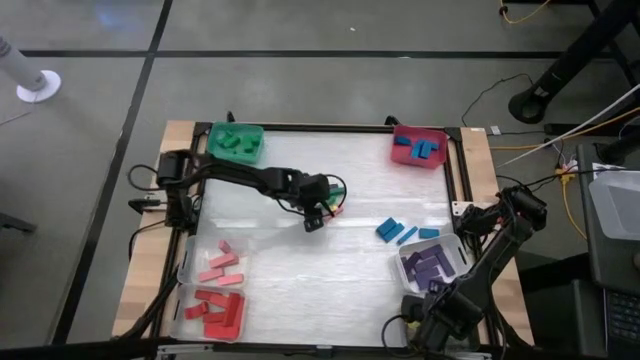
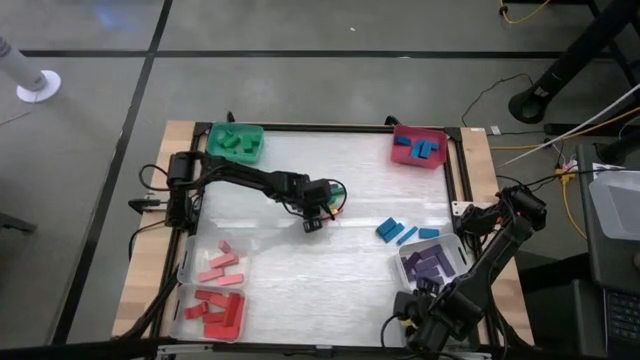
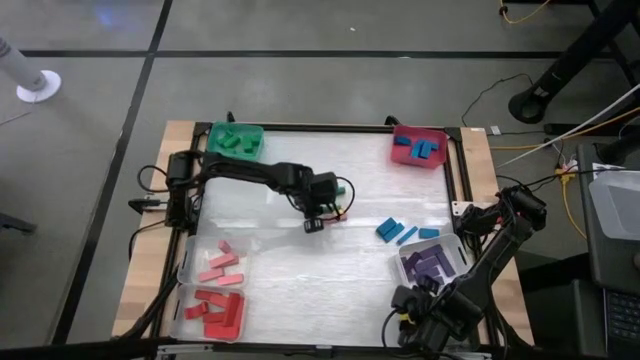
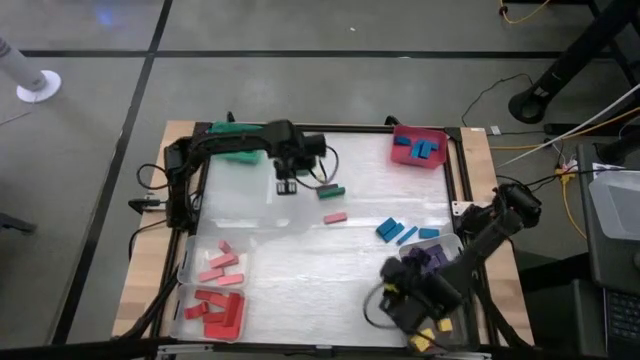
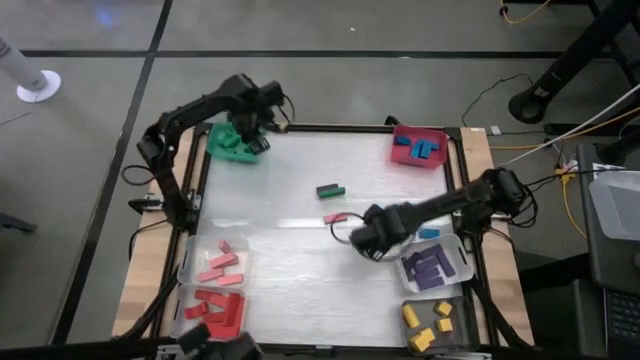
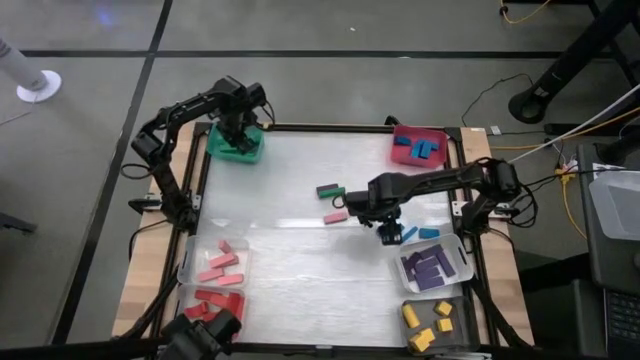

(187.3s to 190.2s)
Task: Sort blocks
Put the green block into the green bin

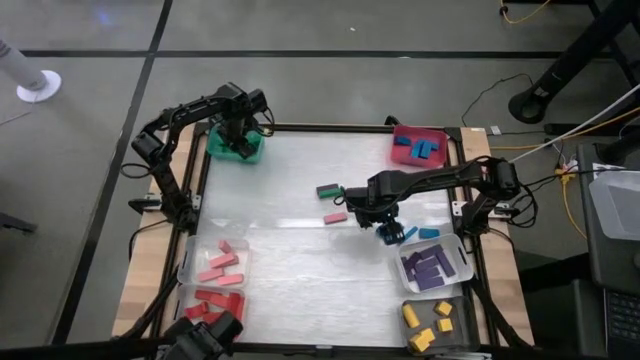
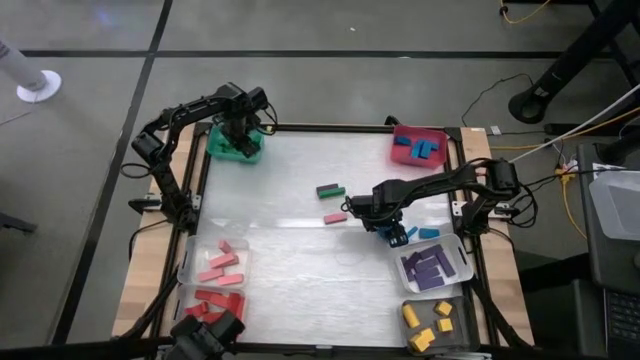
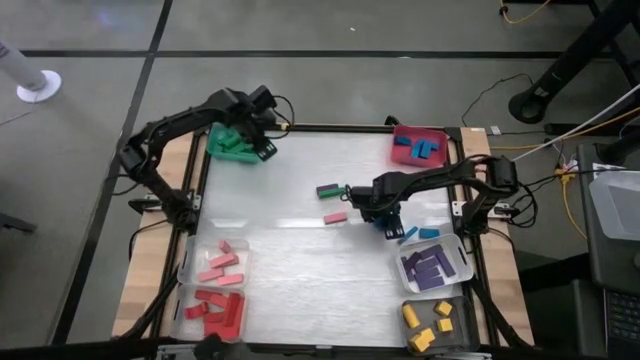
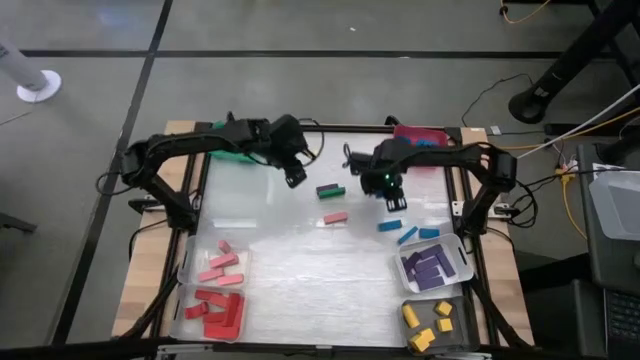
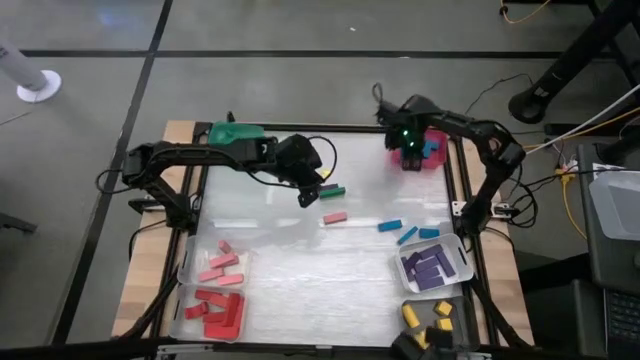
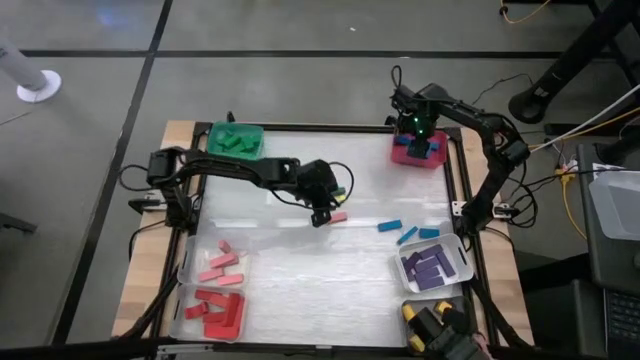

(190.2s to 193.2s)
Put the blue block into the pink bin

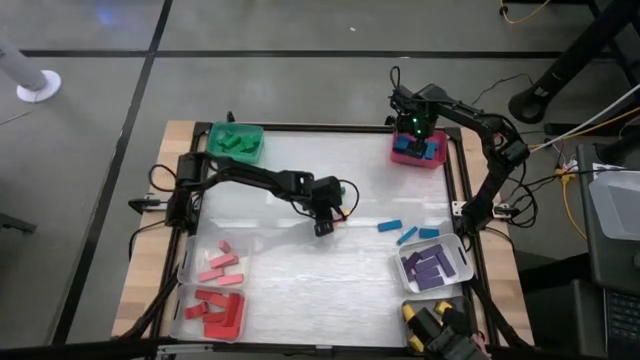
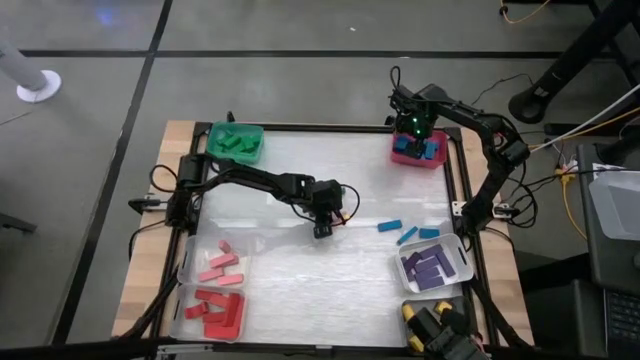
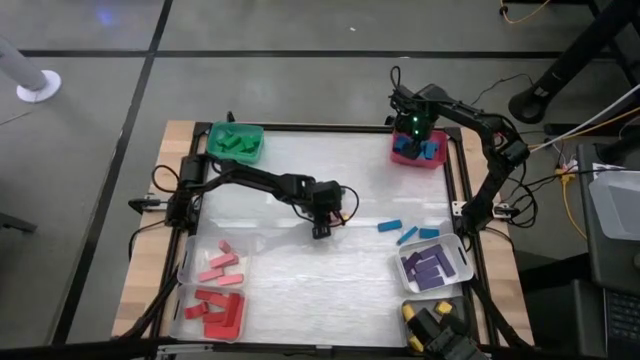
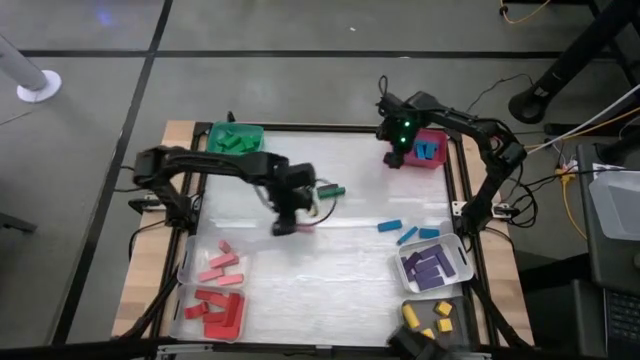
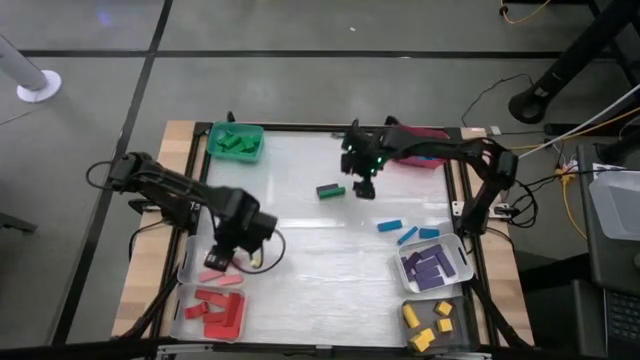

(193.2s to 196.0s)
Put the pink block into the top transparent bin

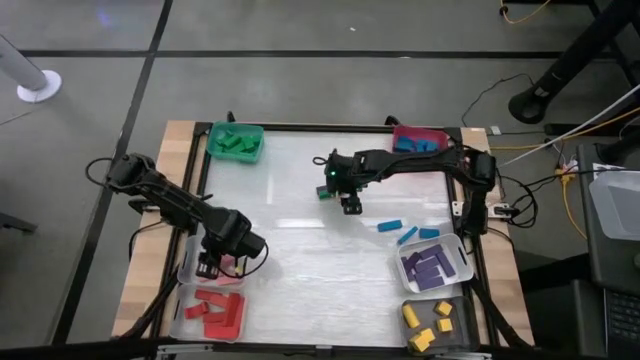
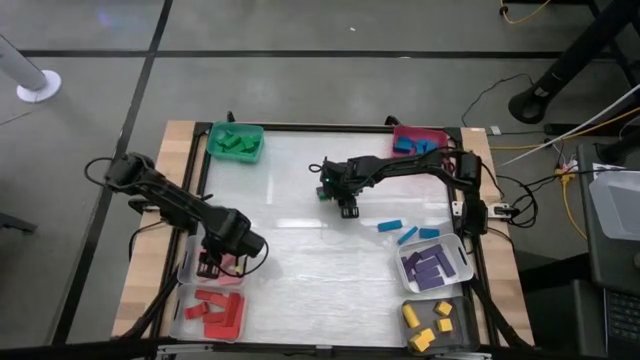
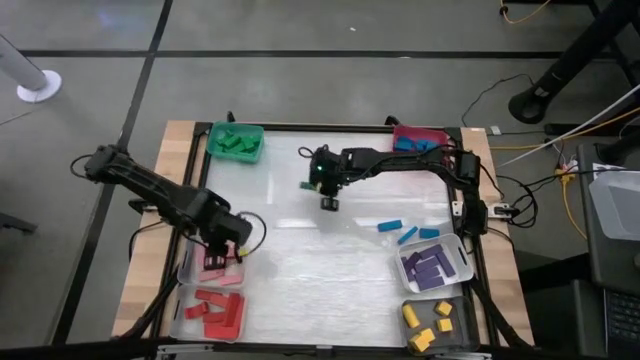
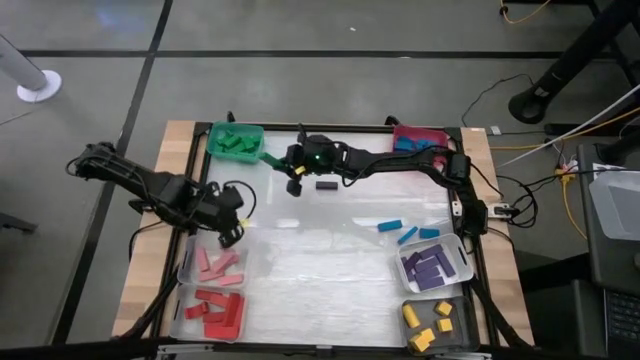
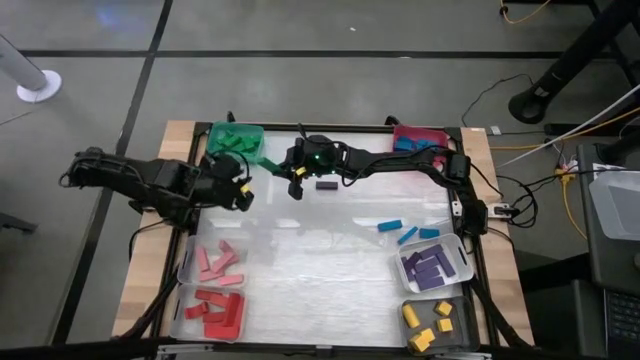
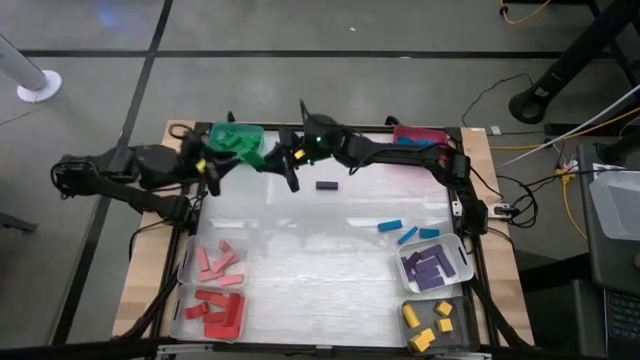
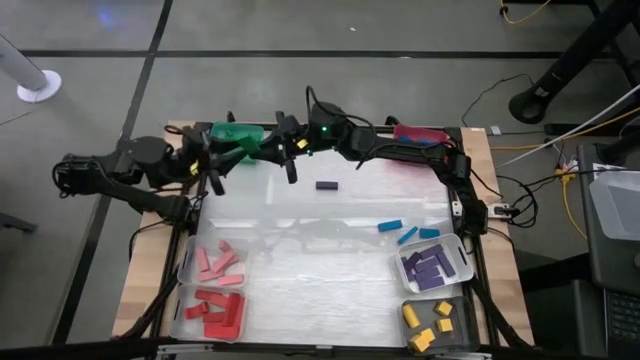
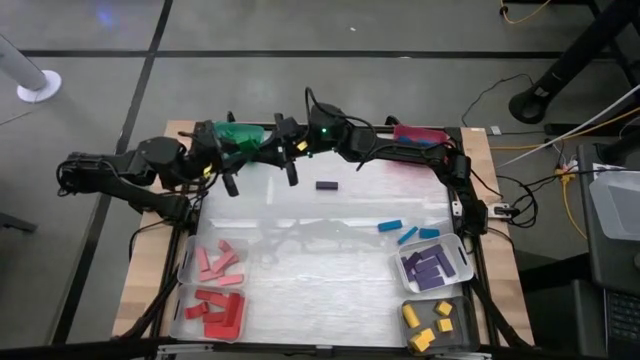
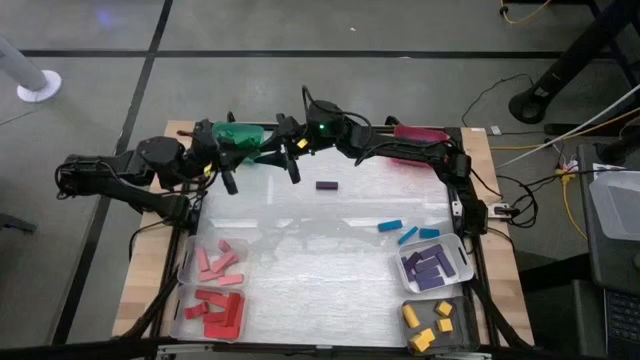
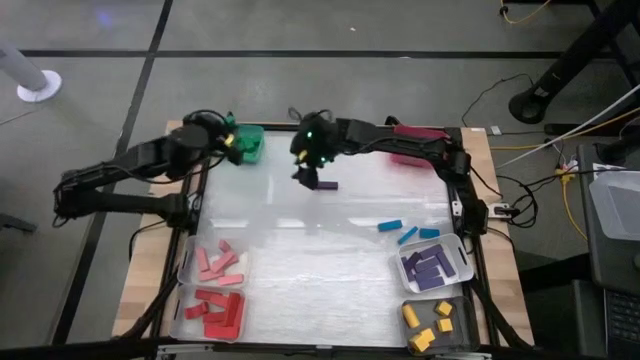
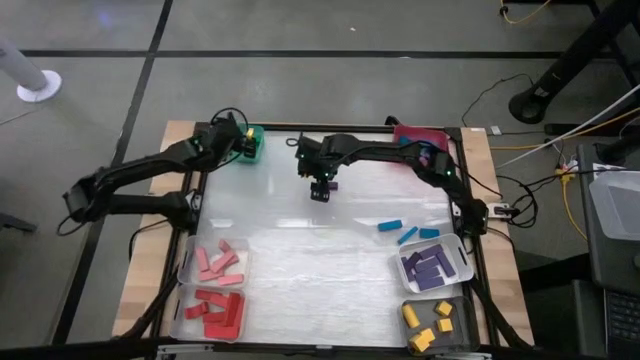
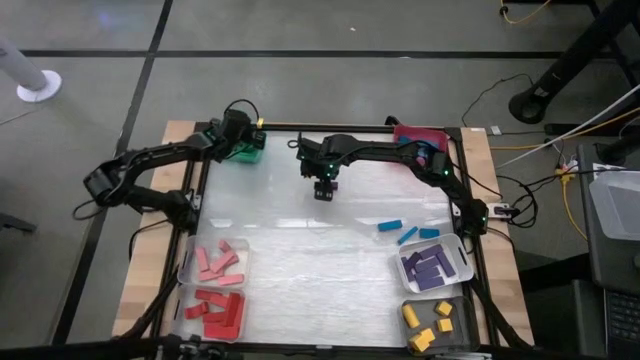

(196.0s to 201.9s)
Put the green block into the green bin

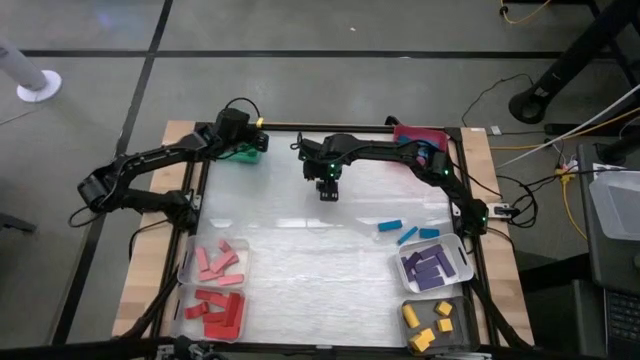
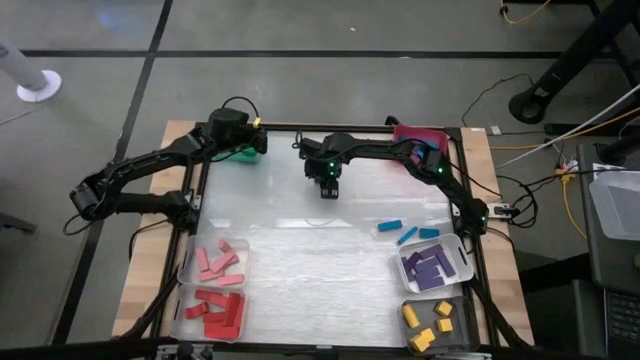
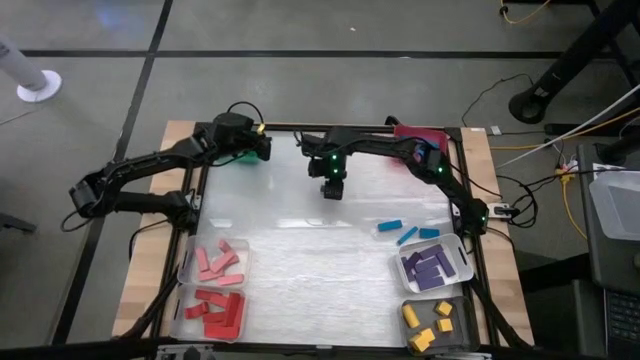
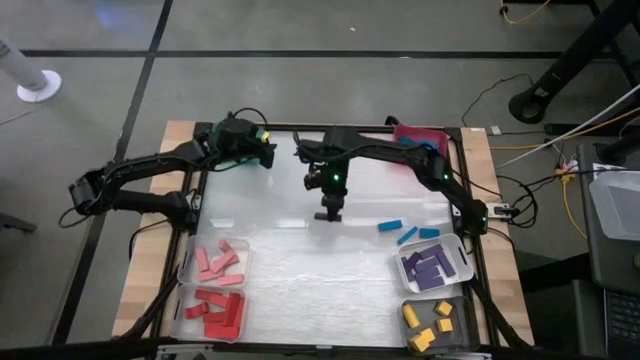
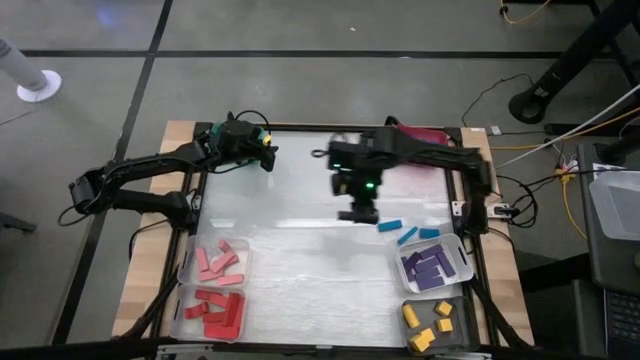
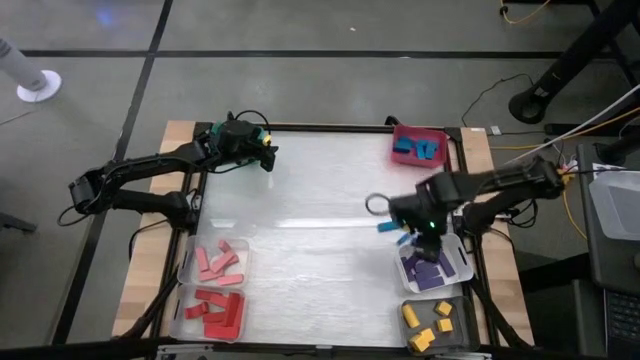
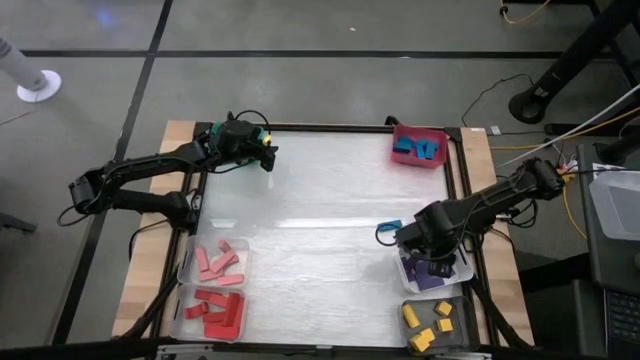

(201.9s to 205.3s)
Put the violet block into the white bin

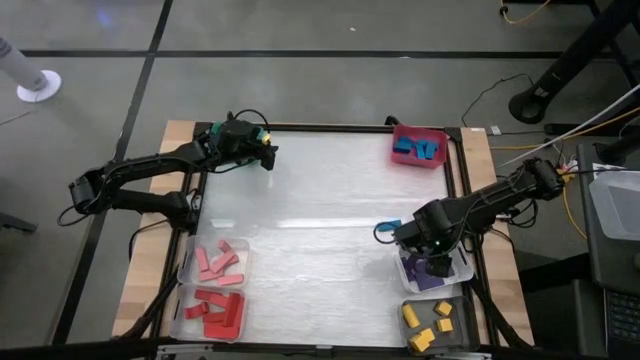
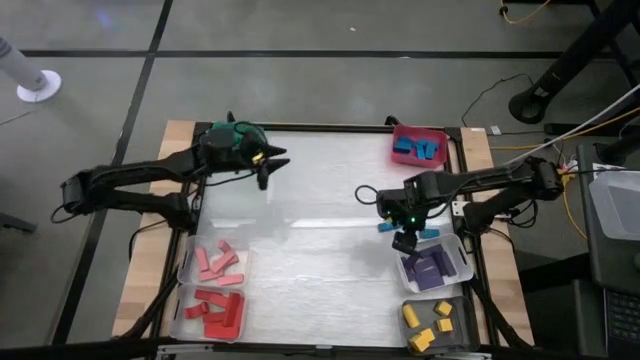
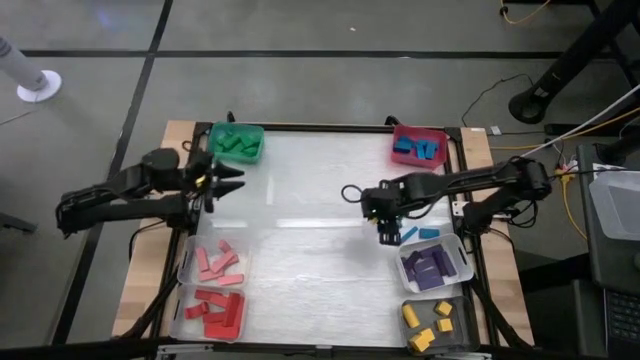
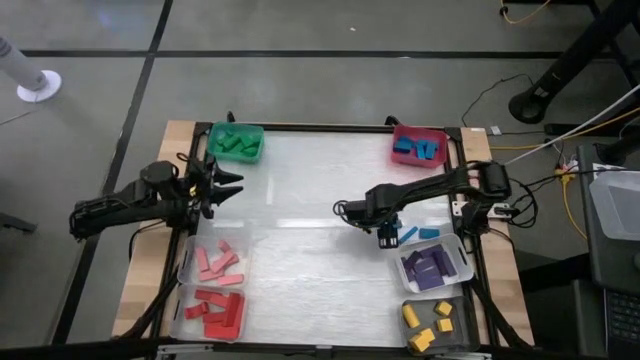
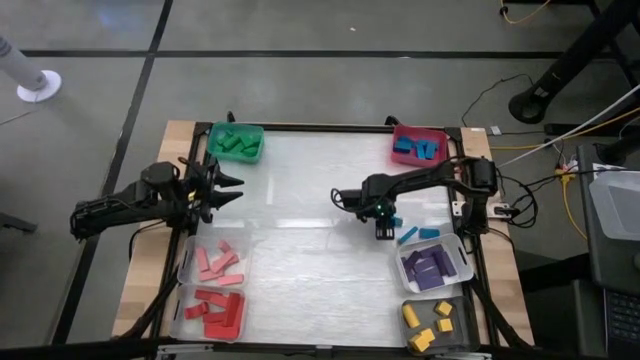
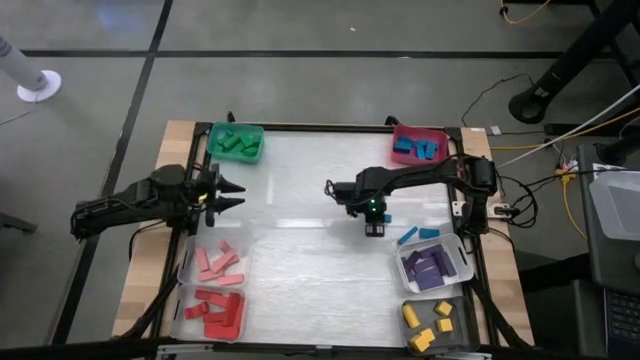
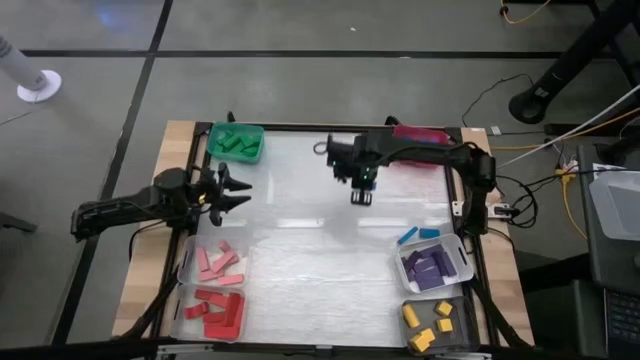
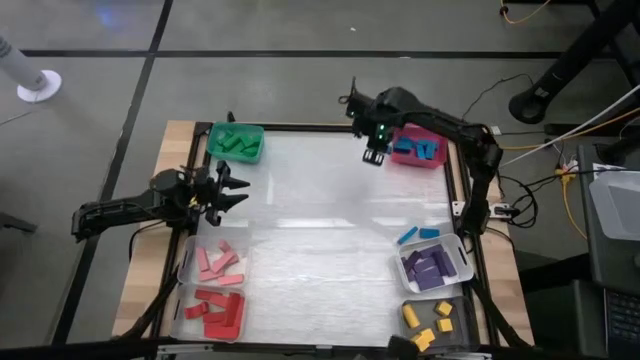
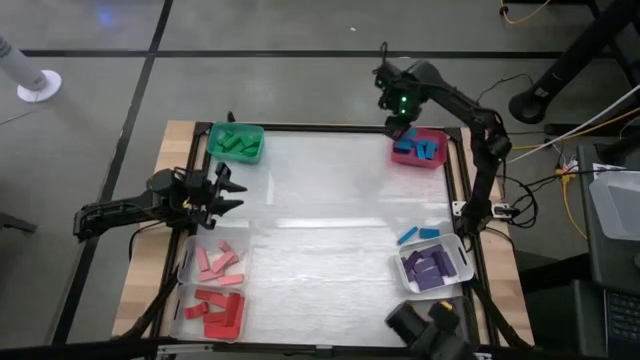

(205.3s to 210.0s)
Put the blue block into the pink bin
